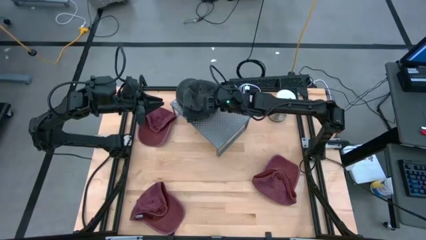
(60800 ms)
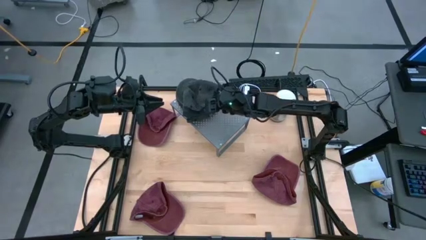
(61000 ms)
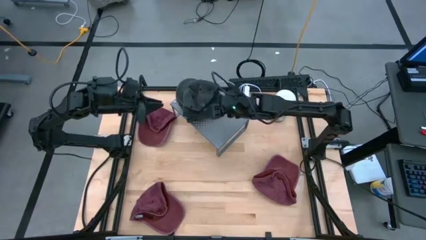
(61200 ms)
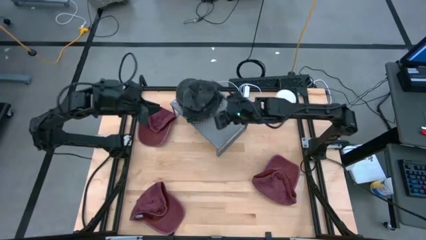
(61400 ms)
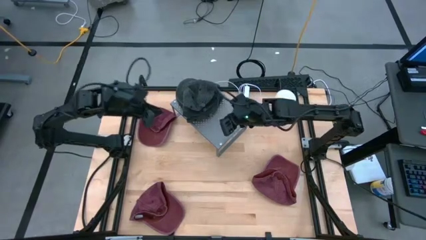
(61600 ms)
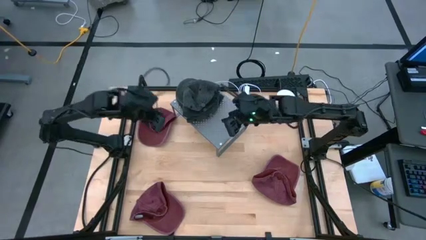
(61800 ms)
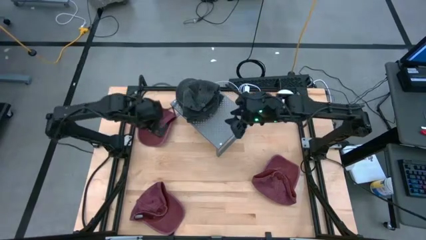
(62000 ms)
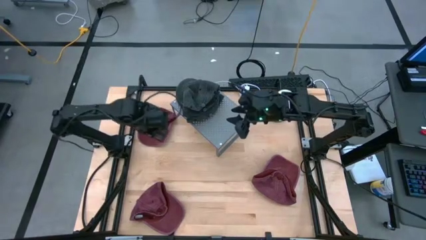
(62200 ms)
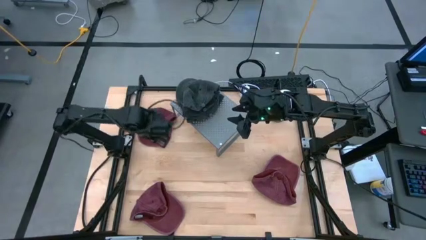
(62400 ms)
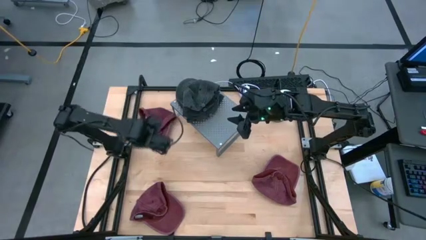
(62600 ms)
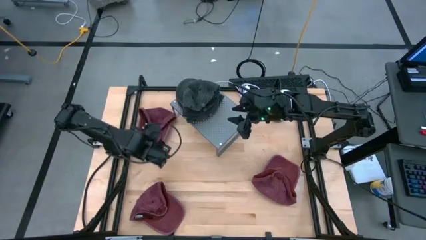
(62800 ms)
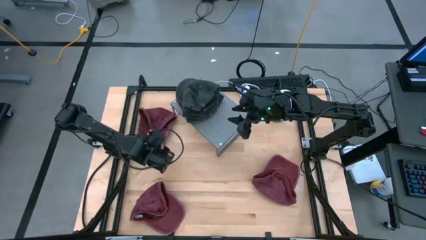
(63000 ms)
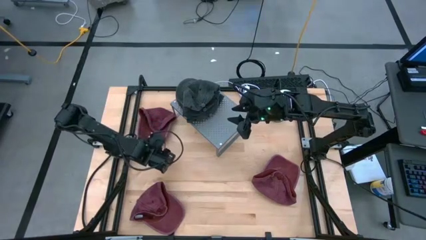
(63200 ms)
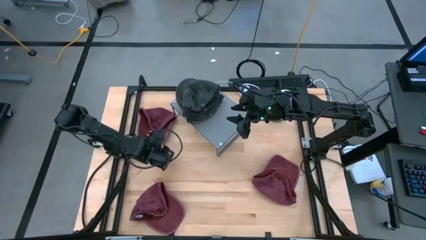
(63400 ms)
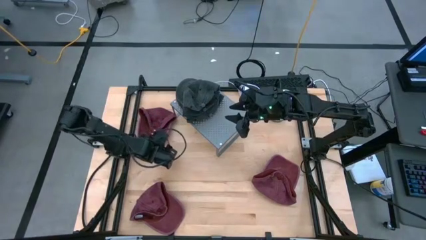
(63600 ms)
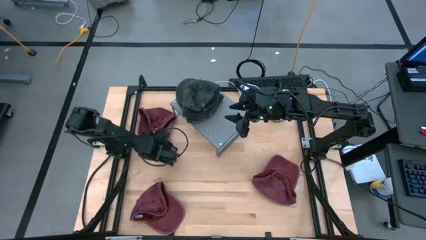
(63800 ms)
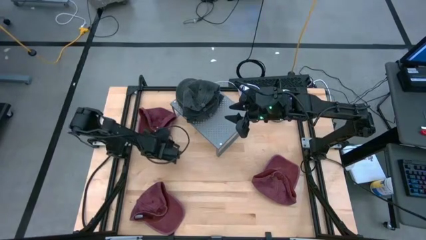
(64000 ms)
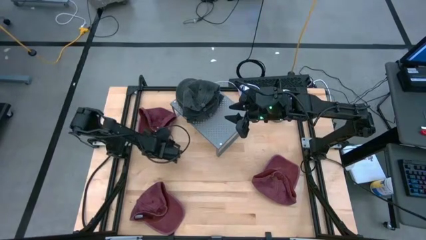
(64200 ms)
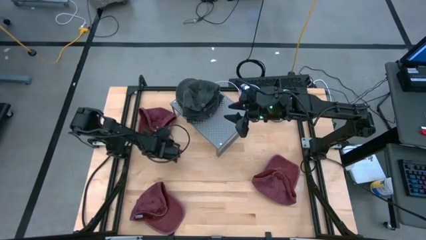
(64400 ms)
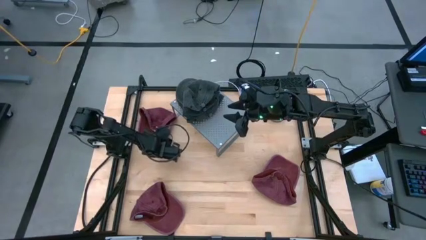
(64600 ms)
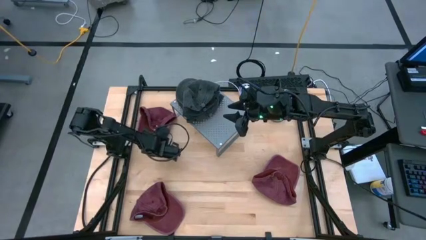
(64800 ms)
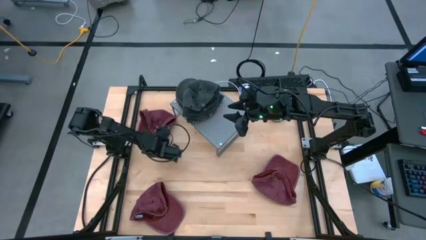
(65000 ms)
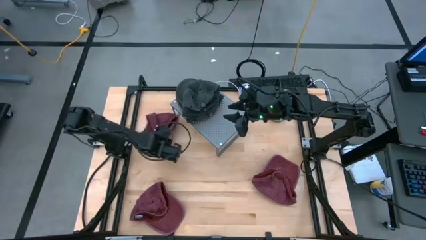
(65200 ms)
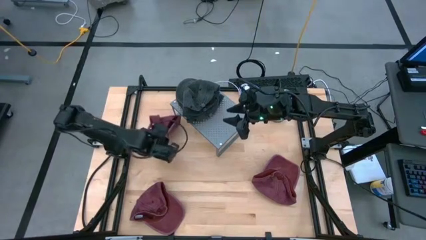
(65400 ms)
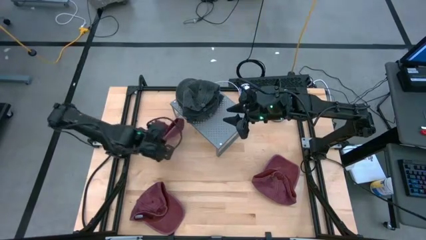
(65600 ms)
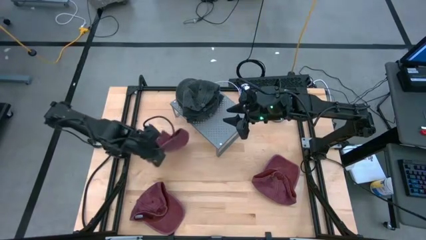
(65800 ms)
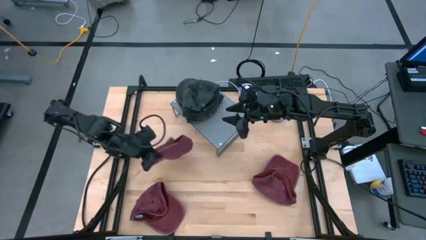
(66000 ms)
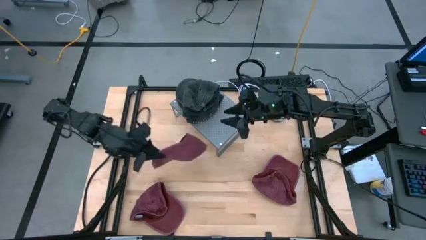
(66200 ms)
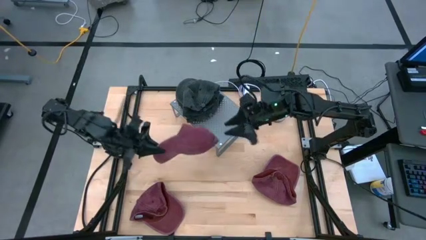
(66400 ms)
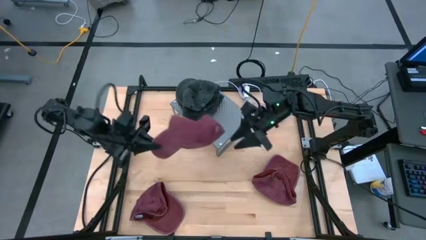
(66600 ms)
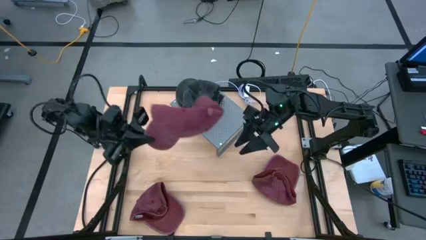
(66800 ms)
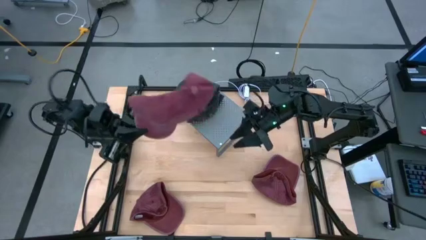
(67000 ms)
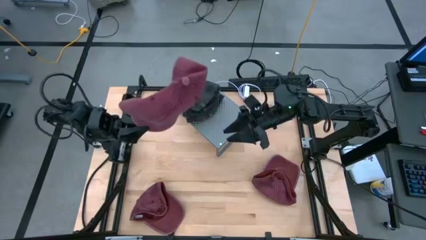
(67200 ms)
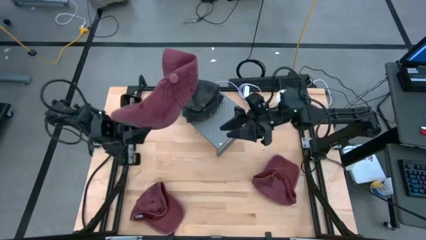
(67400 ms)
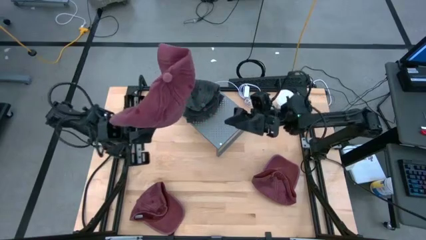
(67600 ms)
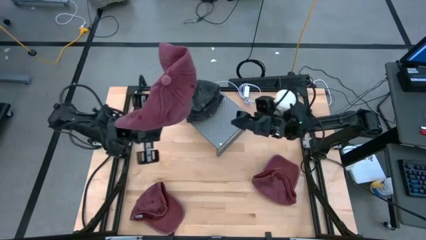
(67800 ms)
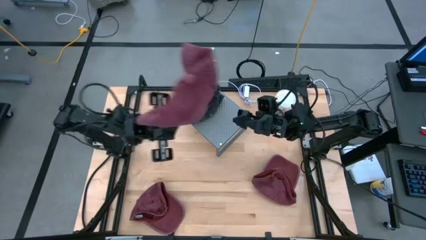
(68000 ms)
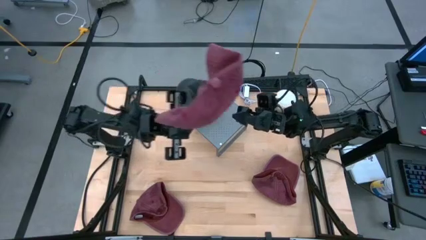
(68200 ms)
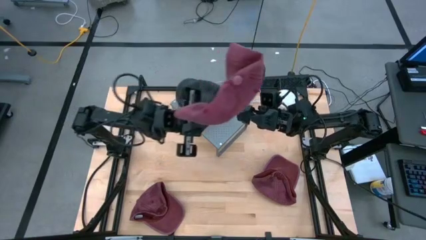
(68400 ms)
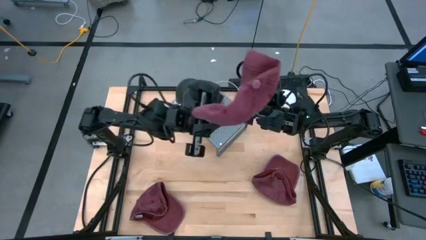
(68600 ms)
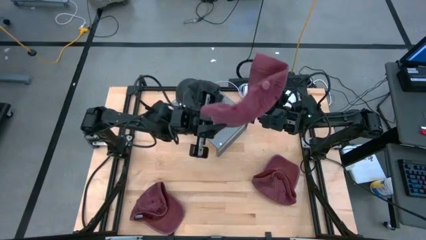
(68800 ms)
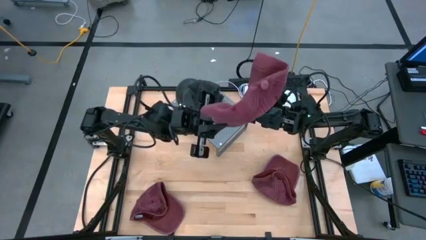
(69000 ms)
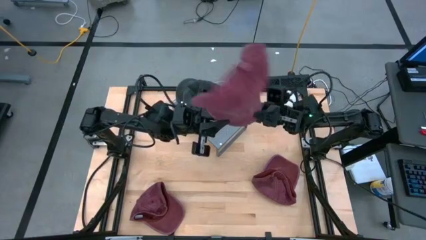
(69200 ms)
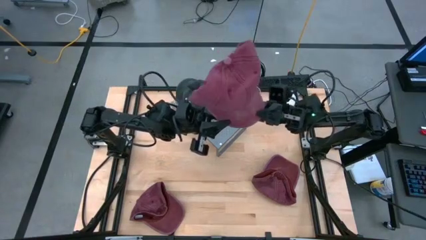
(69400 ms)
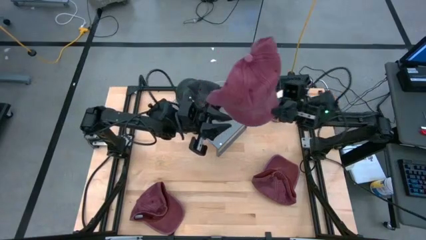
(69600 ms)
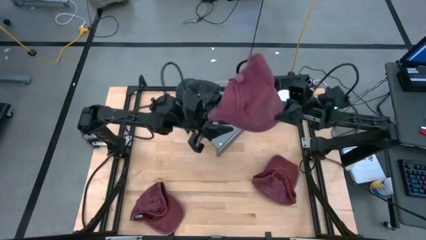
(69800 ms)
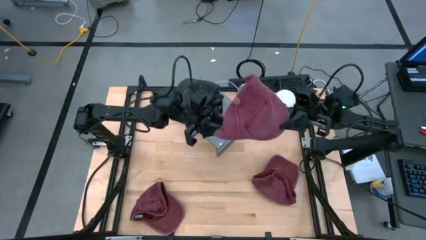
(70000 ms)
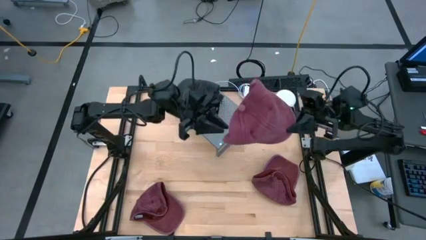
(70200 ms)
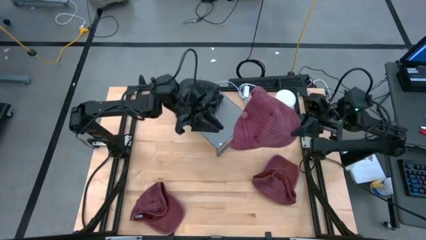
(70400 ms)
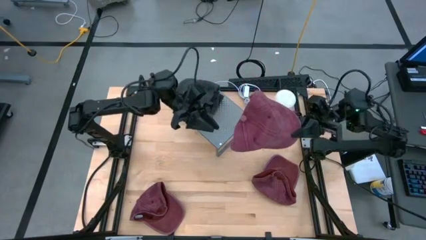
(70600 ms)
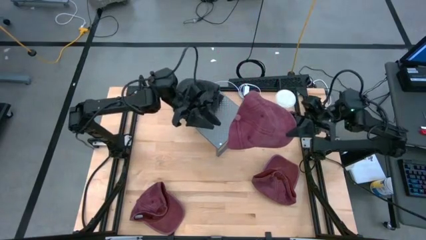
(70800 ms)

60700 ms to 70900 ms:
Task: Pick & Place hat
Put the top red cap on the shelf

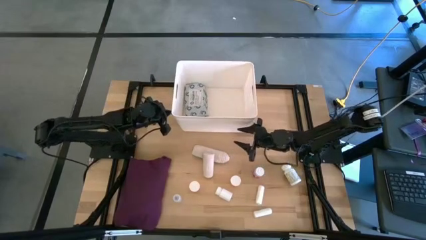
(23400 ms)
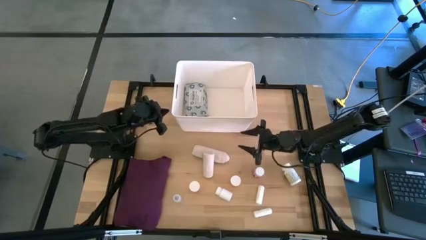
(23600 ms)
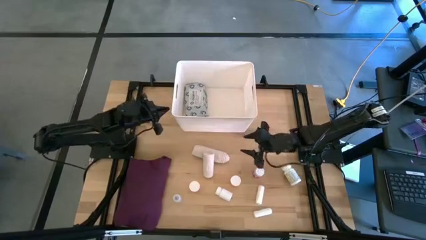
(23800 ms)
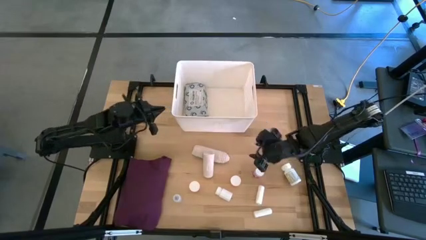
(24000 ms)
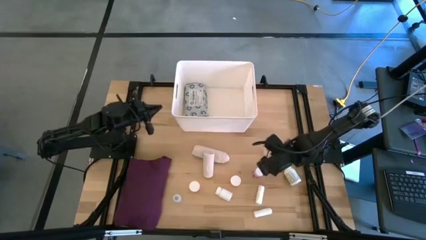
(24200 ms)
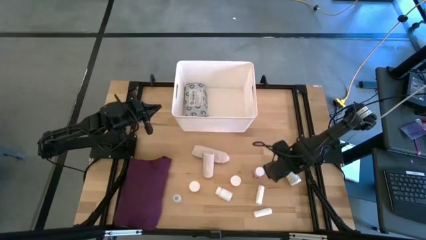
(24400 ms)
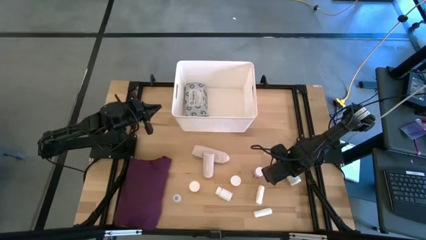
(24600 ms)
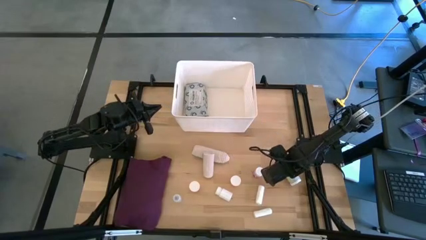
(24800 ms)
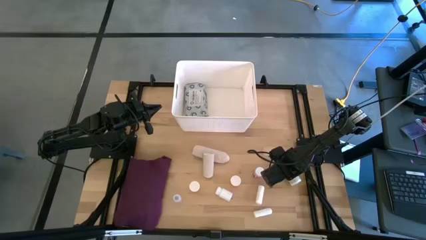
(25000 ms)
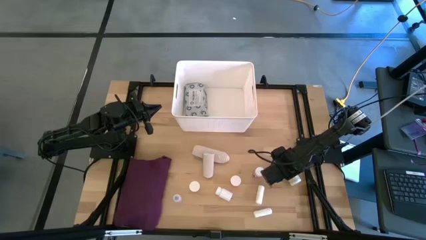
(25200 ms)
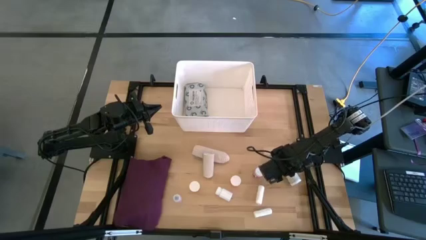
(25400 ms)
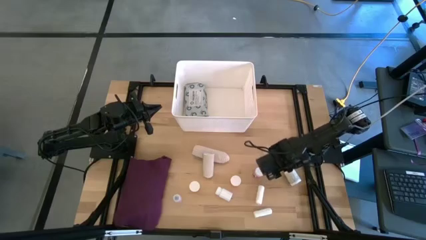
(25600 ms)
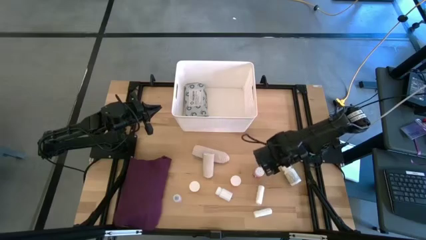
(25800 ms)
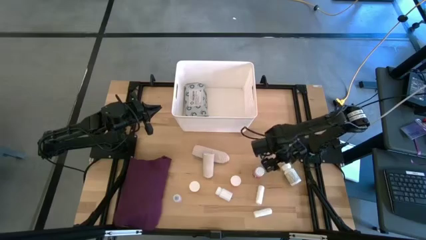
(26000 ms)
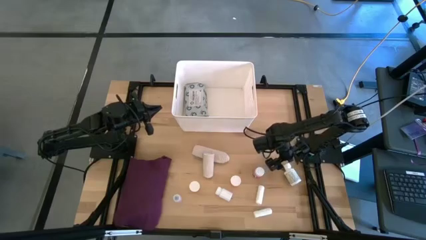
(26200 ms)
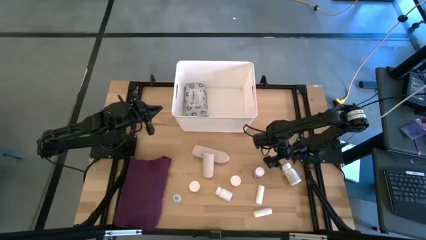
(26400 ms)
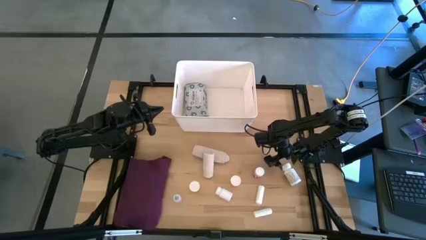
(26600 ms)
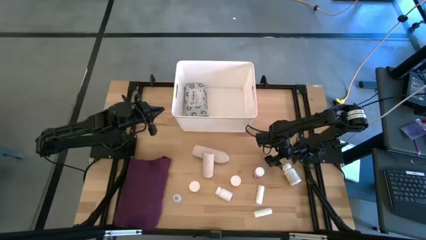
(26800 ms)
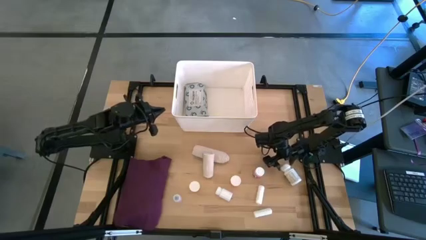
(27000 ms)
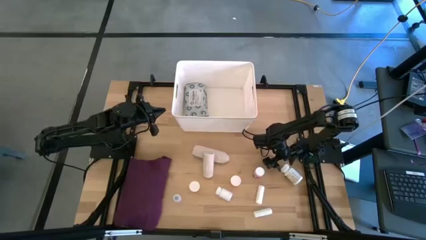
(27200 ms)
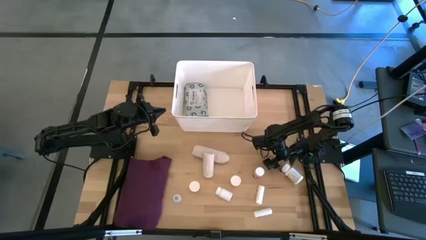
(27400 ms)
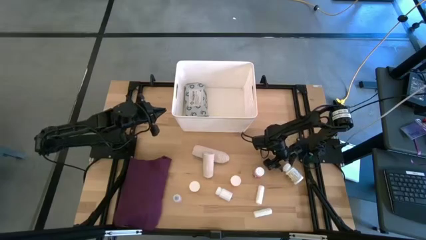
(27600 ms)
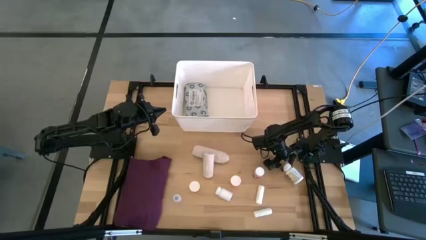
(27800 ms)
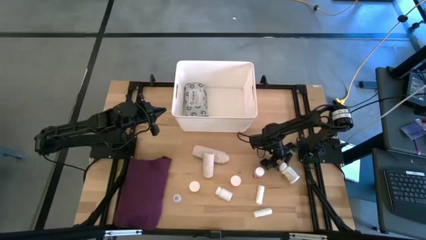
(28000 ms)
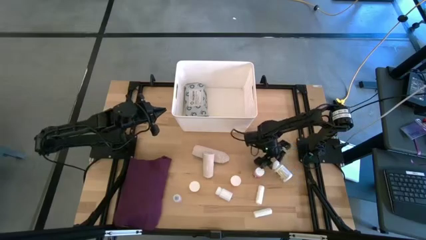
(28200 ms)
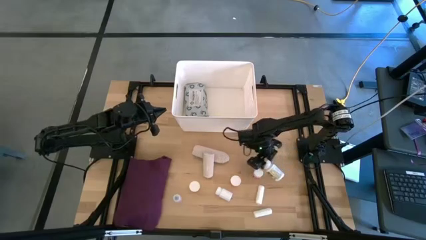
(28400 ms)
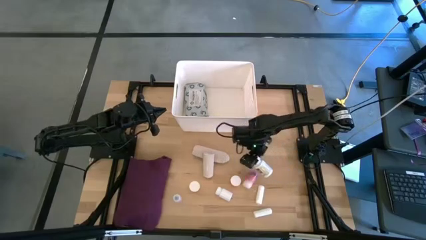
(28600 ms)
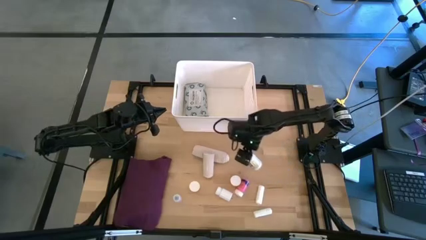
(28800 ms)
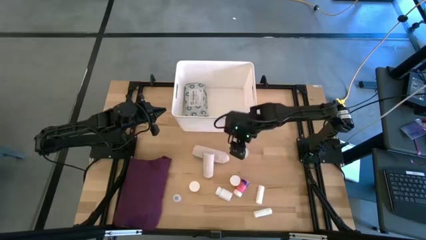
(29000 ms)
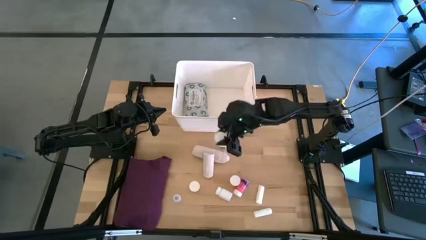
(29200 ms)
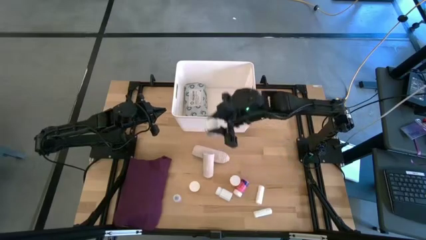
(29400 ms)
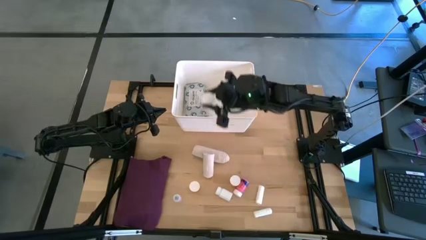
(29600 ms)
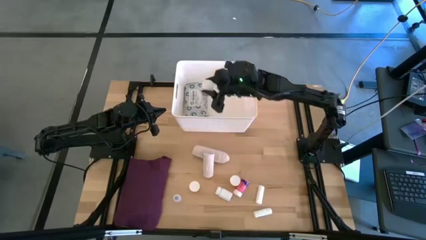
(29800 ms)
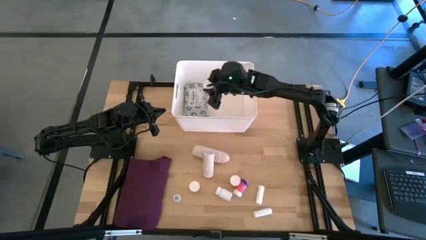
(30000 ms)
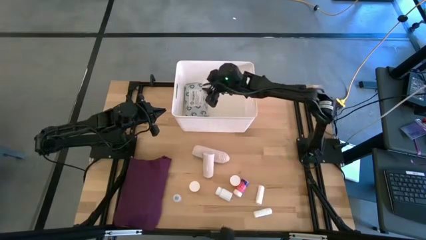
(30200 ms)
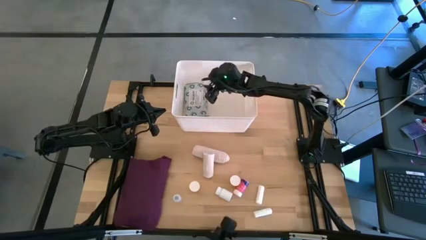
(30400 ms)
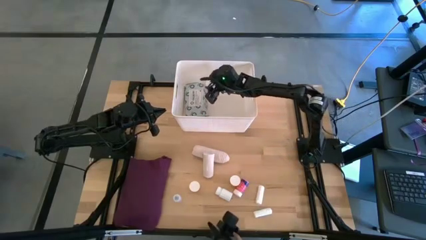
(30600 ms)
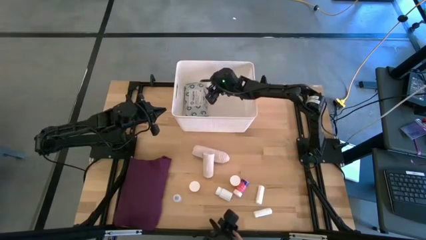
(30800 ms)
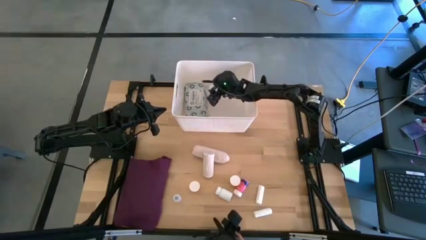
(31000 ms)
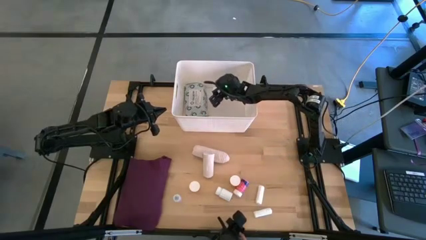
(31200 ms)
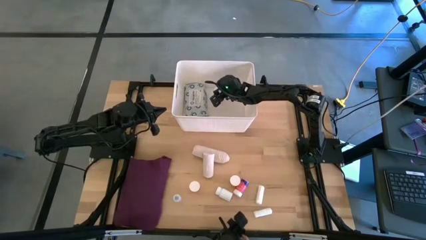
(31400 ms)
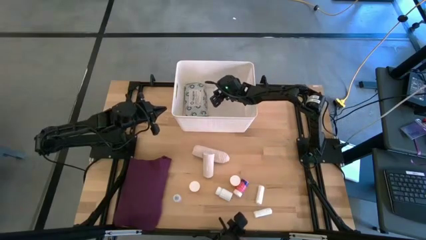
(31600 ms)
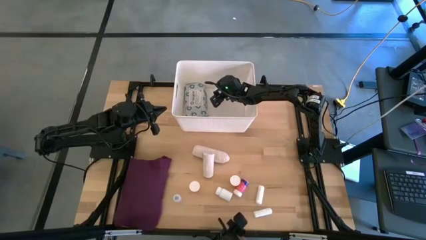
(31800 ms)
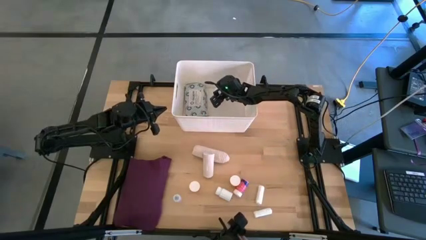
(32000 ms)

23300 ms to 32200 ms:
Task: Pick & place medical supplies in basket/bin
Put the right white pill bottle into the white bin
